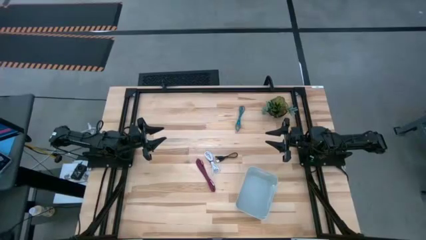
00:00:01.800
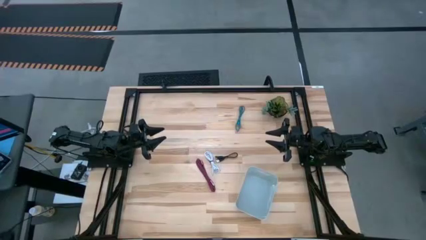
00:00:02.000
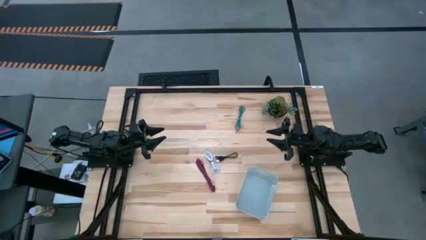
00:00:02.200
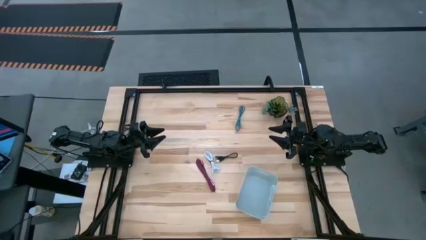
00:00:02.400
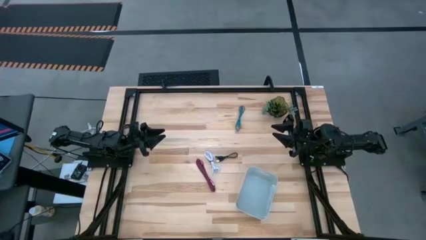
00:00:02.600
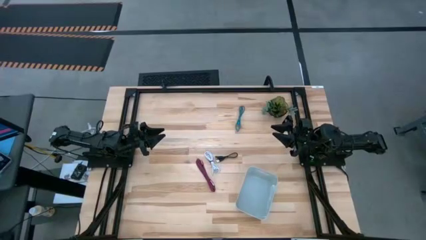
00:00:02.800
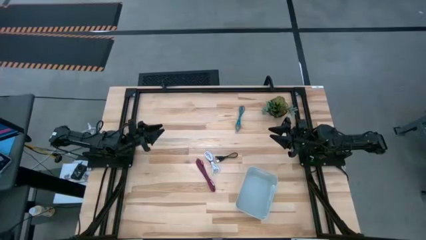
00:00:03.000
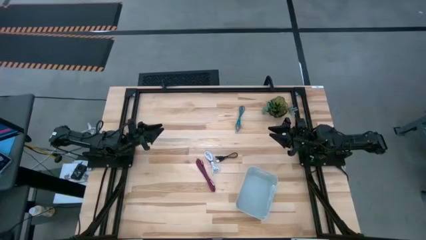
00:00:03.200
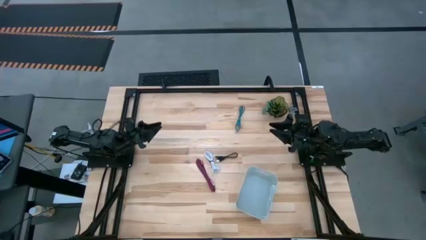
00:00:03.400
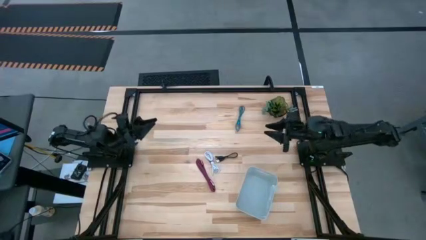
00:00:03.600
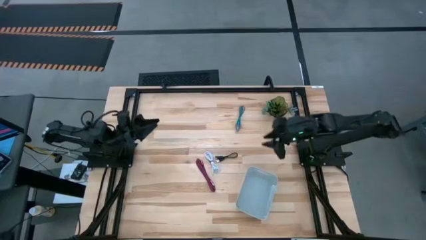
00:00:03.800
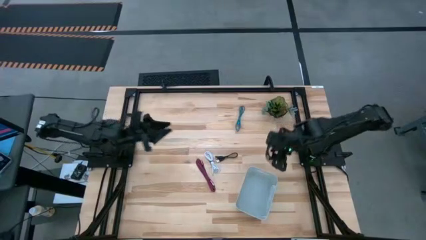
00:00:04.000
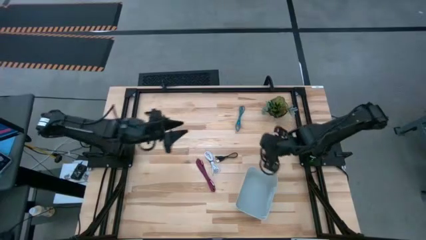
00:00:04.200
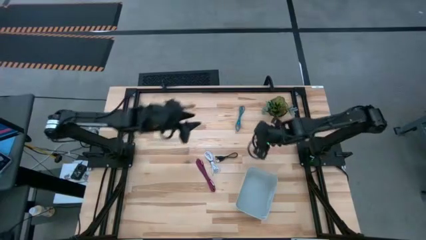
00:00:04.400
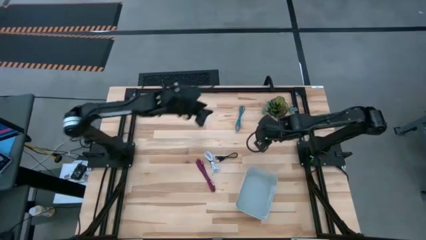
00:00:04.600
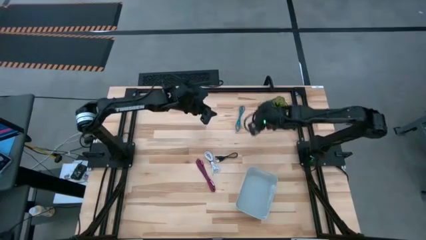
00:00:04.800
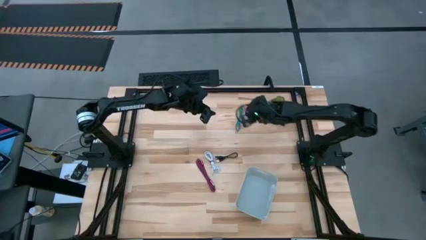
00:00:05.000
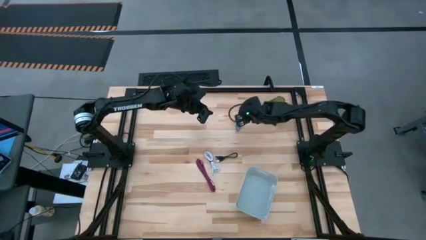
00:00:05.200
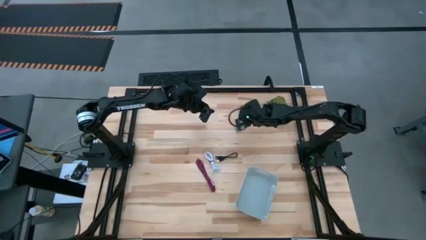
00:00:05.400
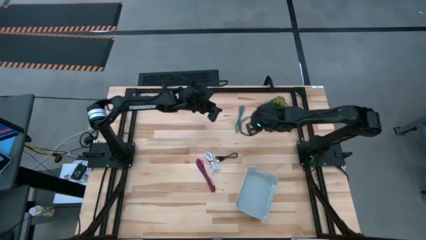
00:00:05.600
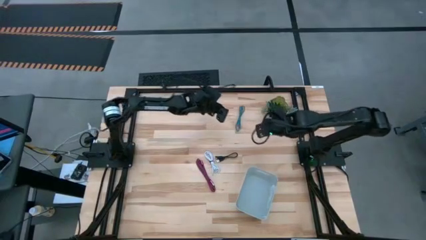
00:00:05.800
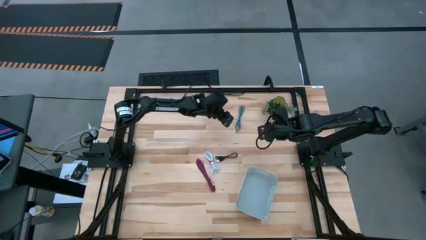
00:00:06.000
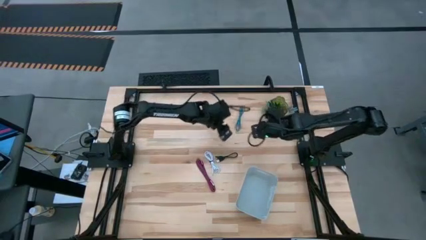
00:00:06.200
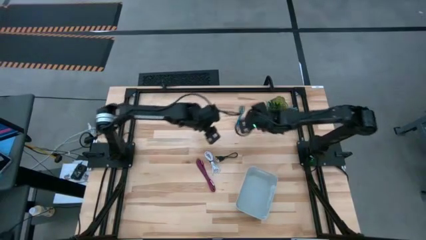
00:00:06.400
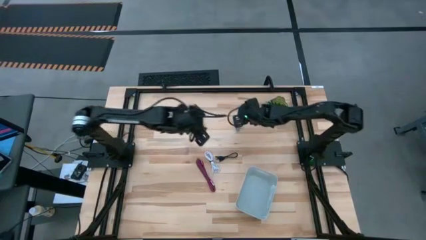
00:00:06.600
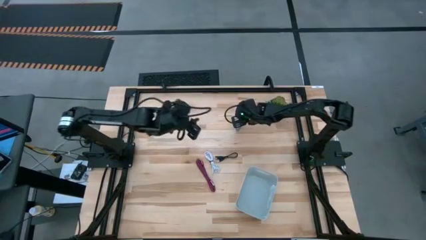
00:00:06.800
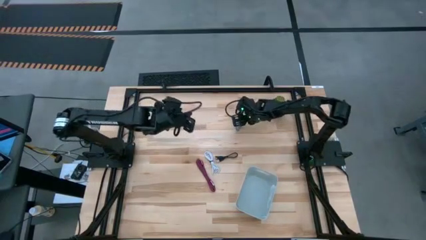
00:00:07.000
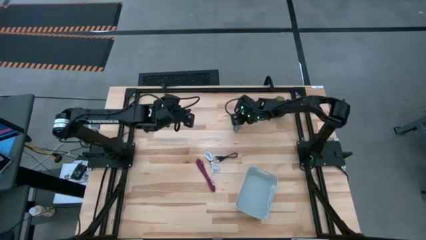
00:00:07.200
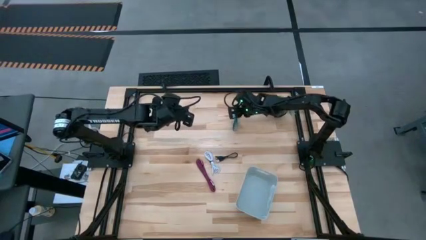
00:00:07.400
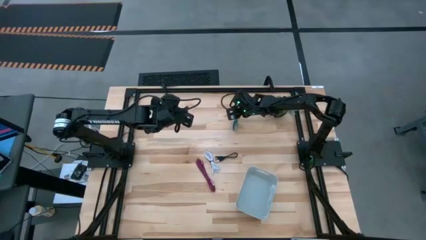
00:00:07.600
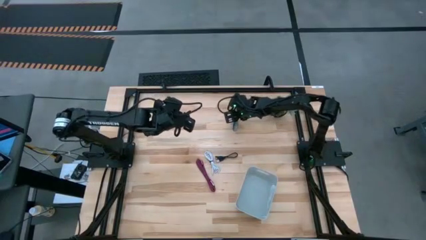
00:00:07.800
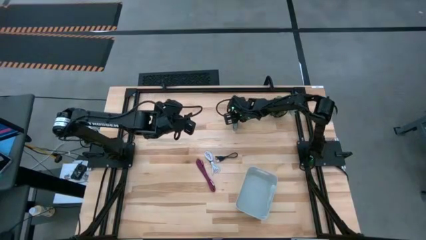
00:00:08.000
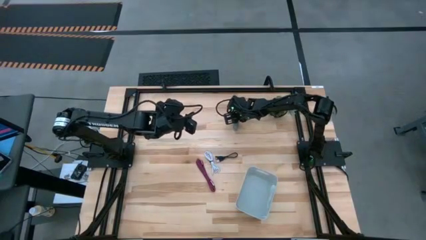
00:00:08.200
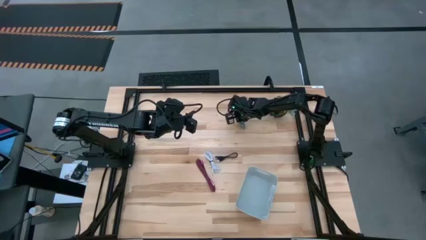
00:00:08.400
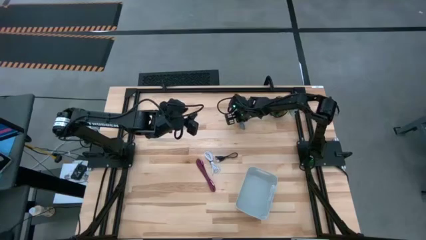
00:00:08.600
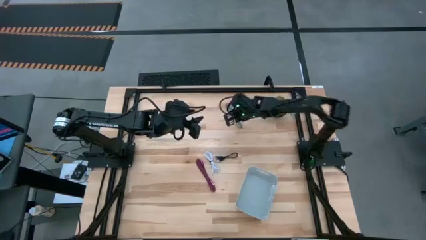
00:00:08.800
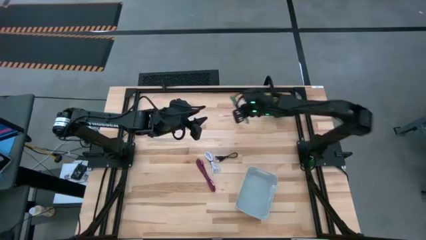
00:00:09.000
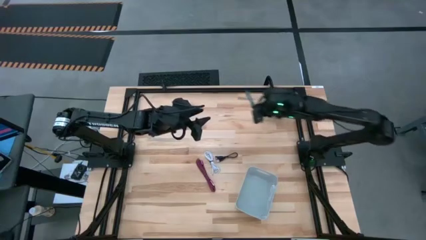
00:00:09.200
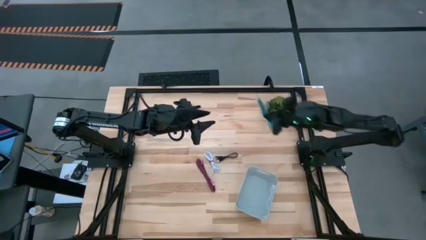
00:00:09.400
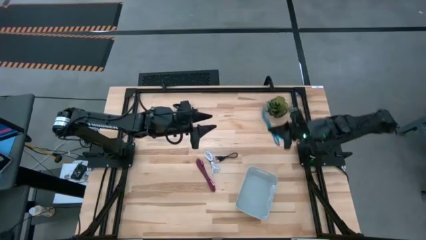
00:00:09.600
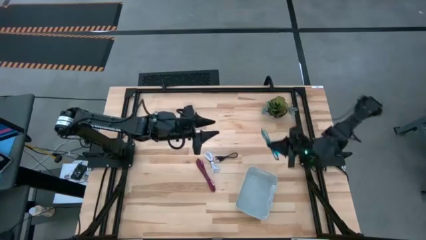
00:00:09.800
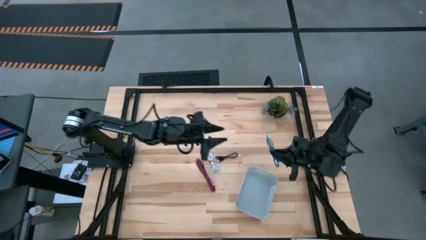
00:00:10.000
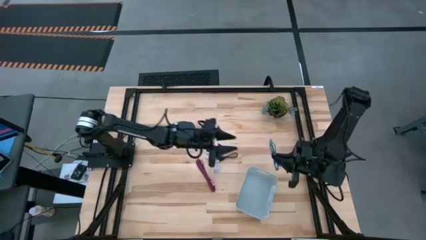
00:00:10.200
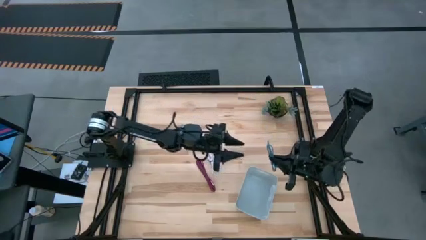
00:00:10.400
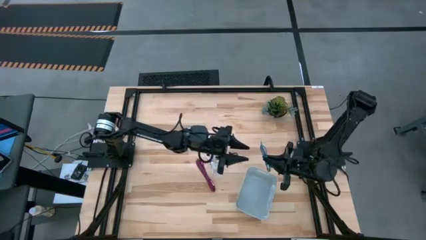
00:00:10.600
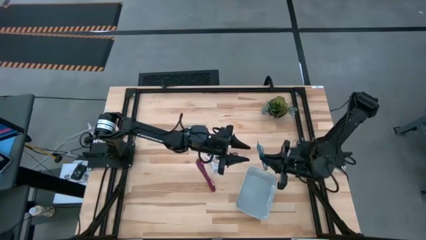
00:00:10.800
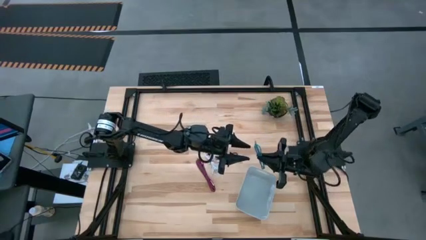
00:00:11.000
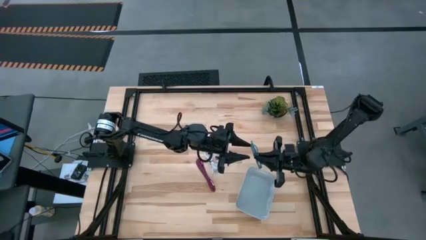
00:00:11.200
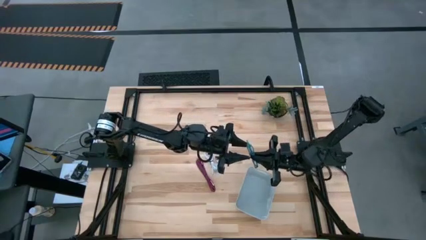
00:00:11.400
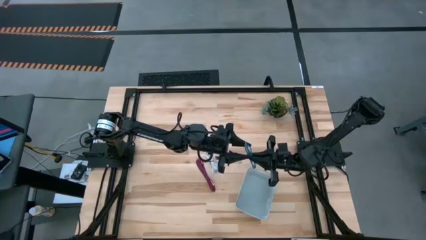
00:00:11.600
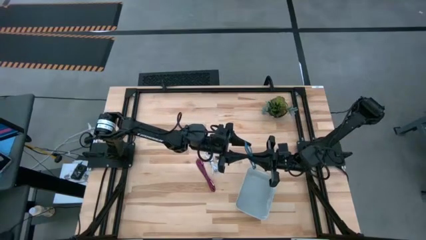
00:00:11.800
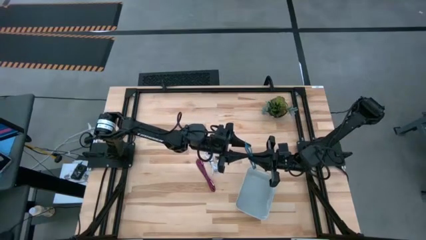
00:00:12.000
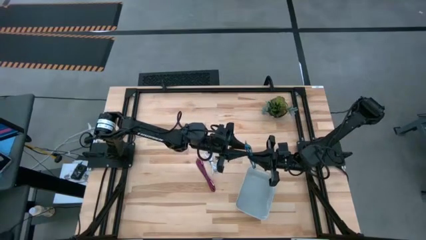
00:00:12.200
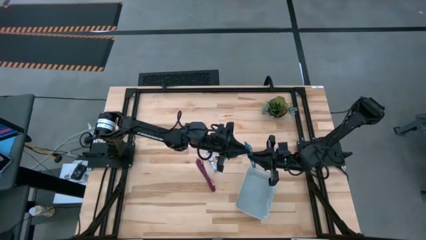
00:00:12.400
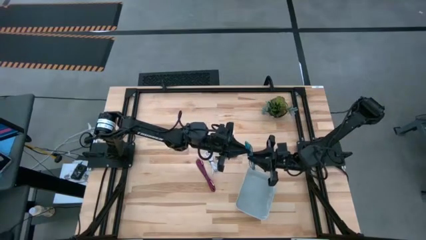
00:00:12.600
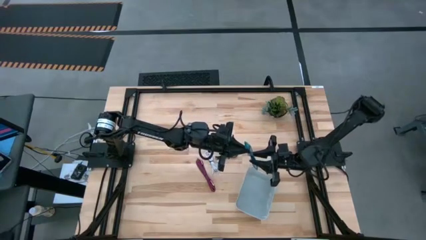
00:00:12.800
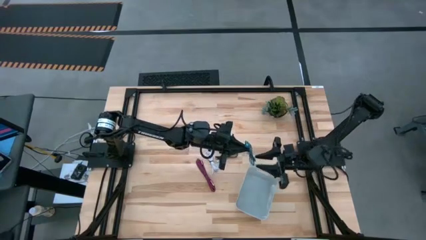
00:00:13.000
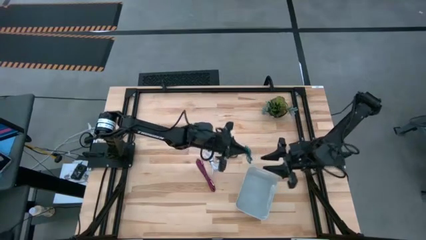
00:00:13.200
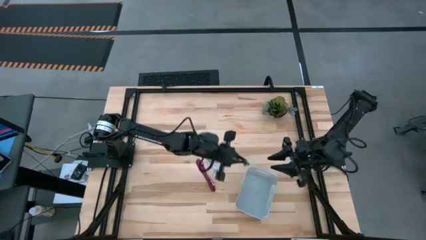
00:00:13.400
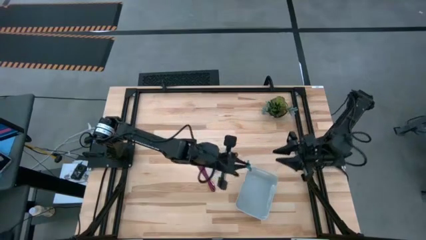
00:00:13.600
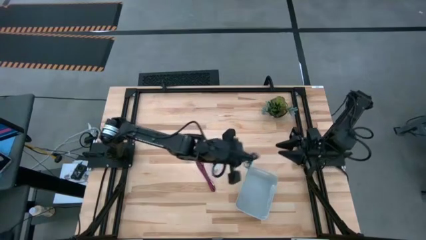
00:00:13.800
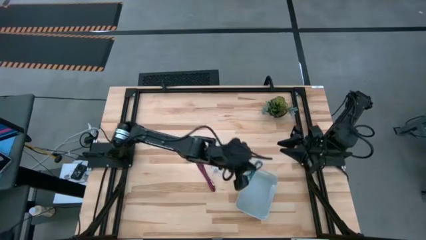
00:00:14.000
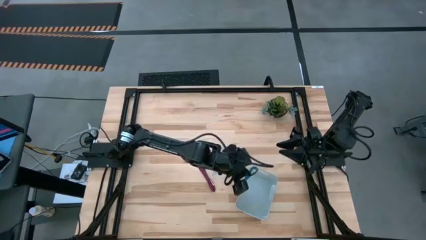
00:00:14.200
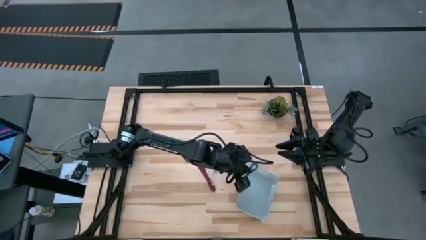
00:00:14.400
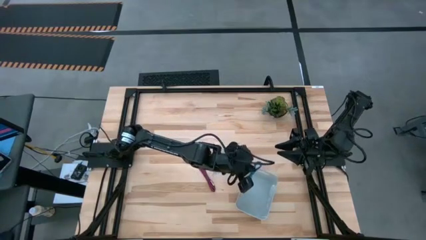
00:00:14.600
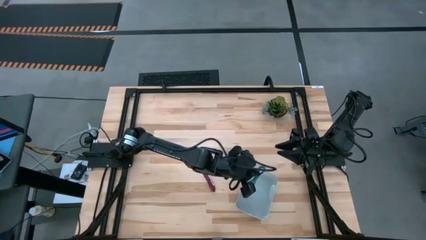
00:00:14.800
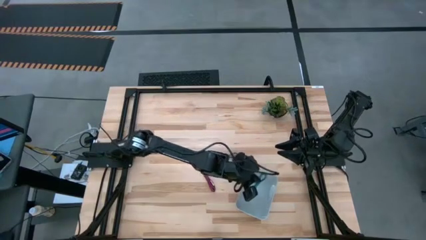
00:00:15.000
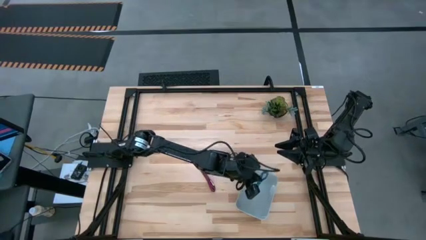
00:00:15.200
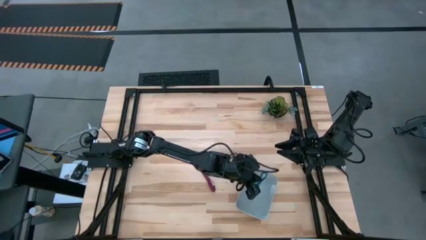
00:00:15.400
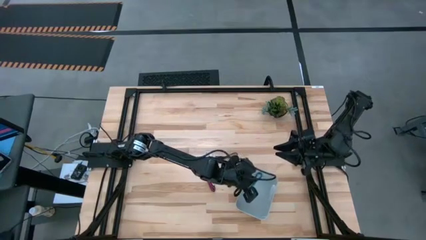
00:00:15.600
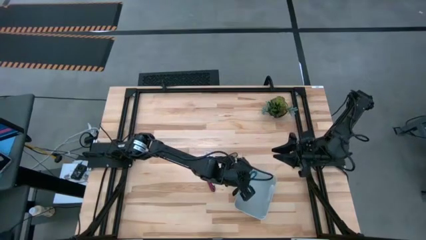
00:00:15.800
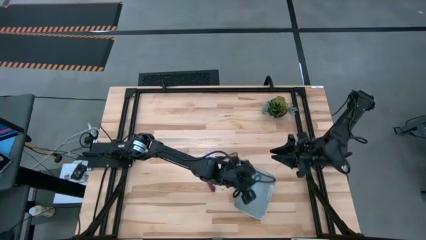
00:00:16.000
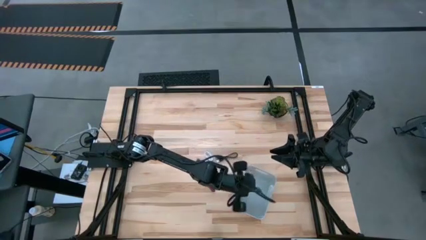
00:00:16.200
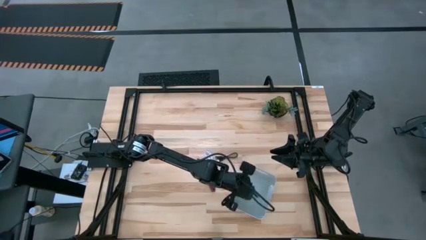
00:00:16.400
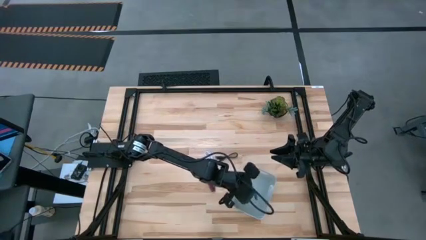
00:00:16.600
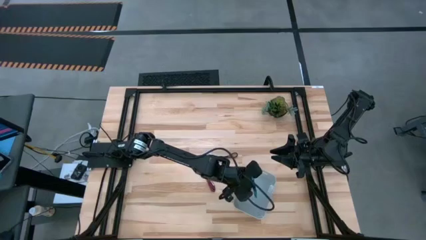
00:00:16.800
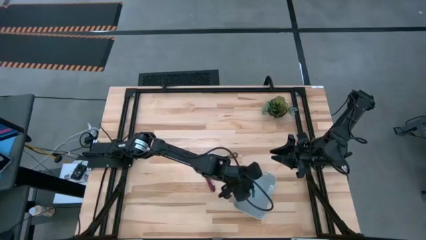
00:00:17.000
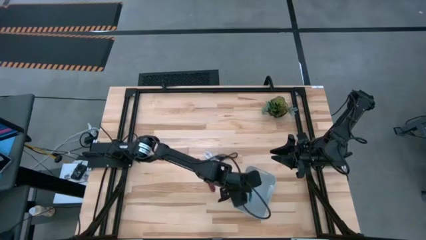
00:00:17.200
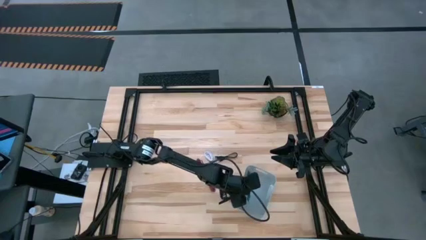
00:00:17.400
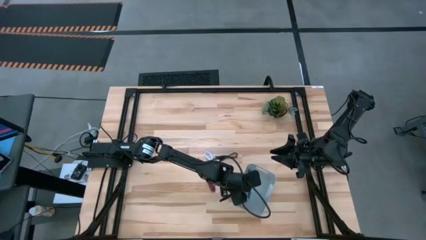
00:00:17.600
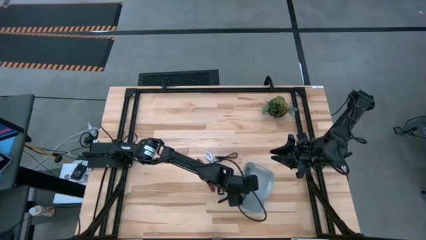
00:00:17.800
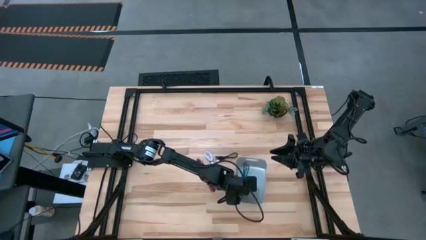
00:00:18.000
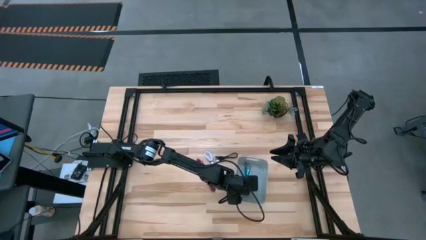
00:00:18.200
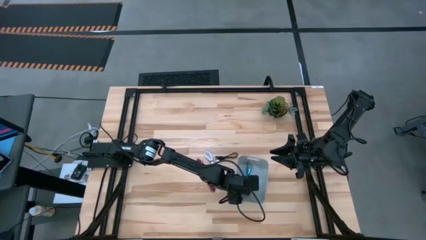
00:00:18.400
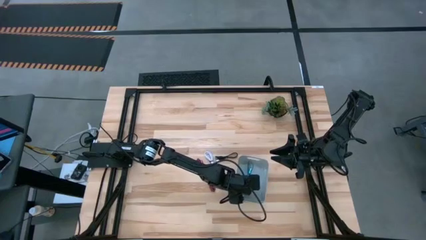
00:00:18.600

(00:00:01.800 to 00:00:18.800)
Task: Pick and place USB-C Cables
Put the blue charger cable into the gray bin
